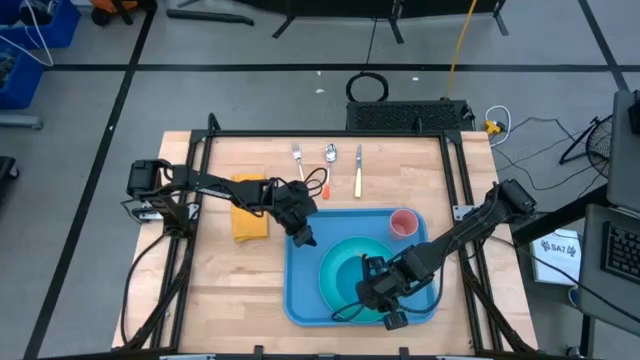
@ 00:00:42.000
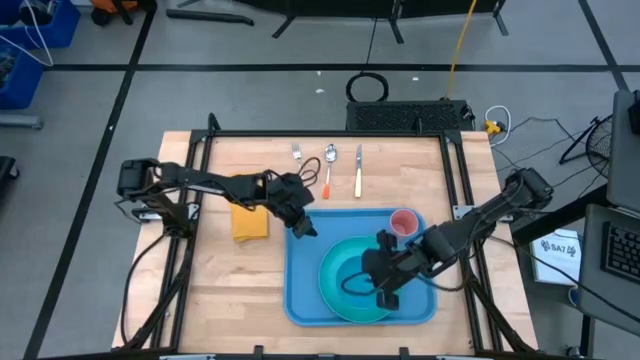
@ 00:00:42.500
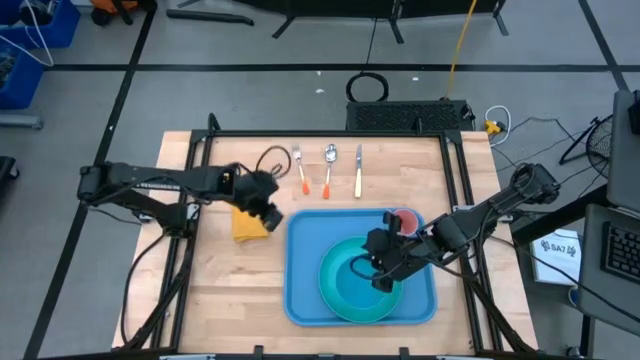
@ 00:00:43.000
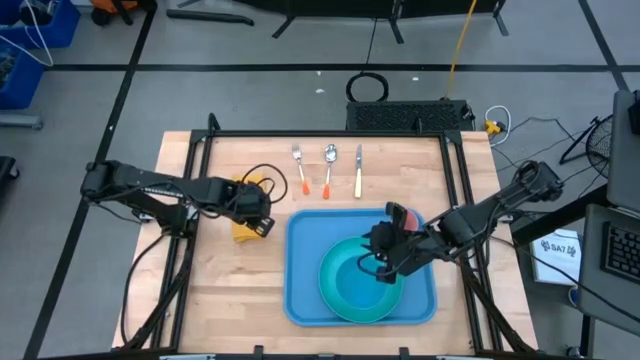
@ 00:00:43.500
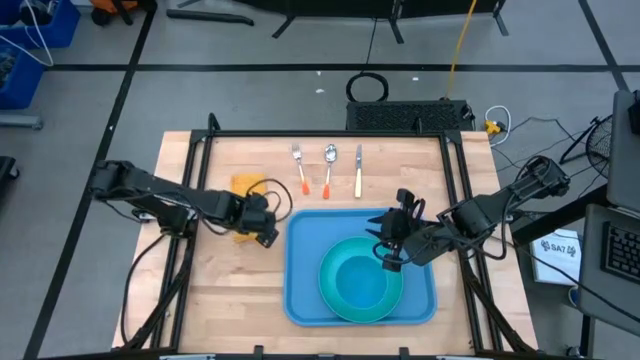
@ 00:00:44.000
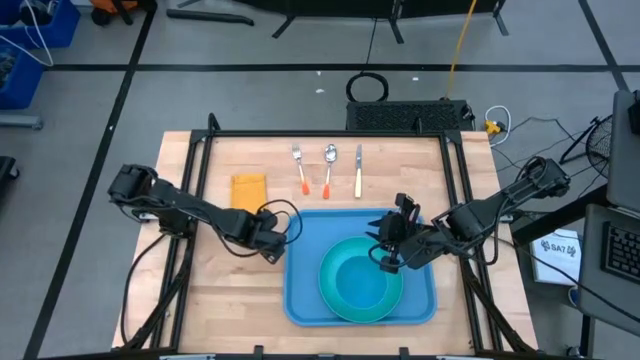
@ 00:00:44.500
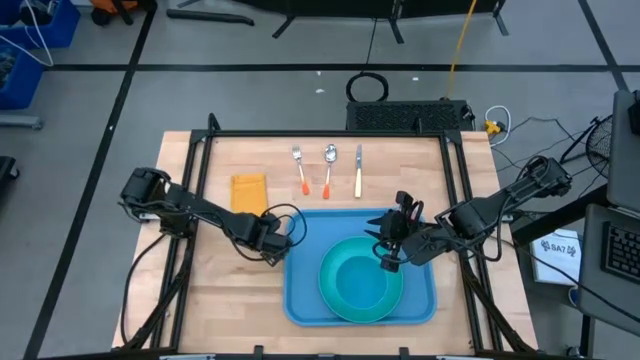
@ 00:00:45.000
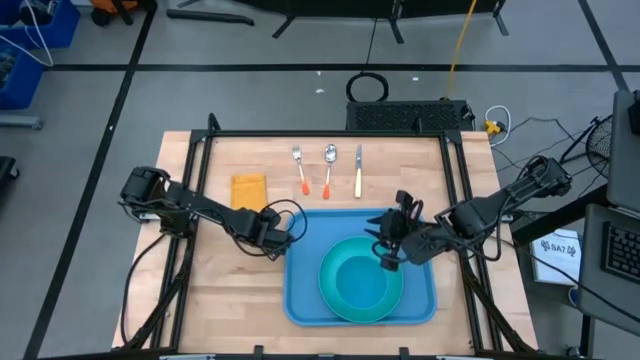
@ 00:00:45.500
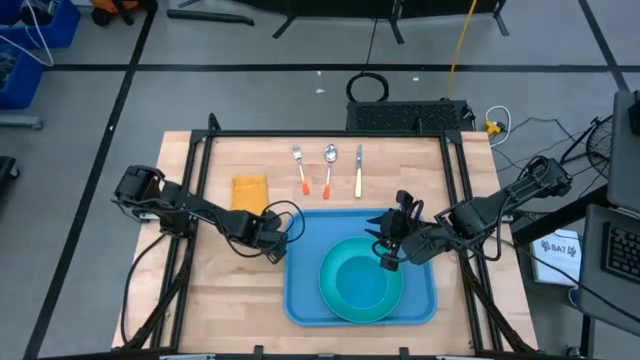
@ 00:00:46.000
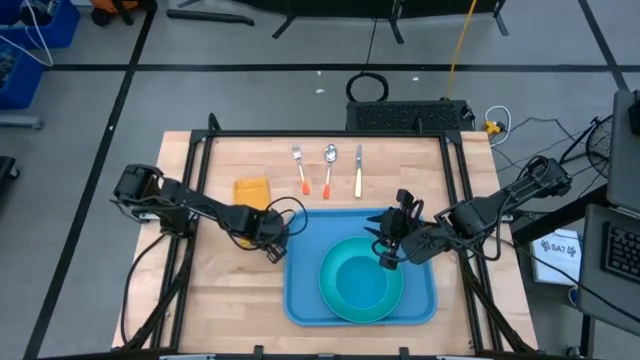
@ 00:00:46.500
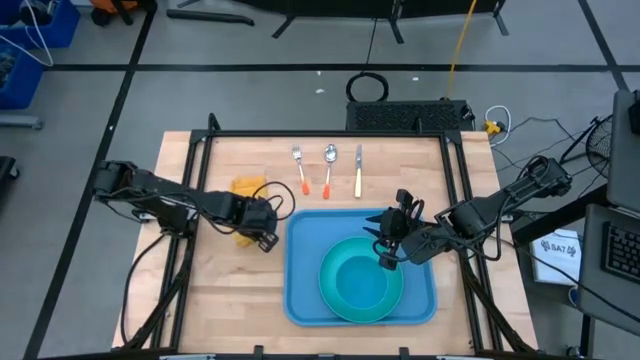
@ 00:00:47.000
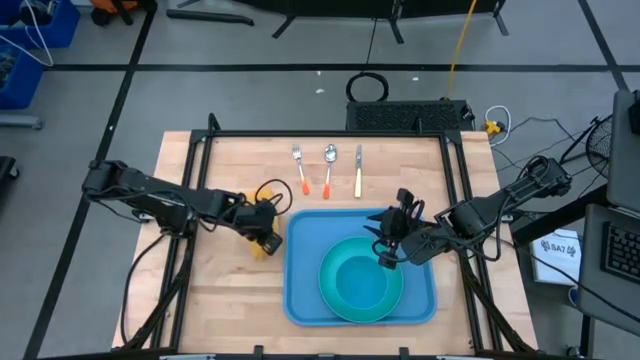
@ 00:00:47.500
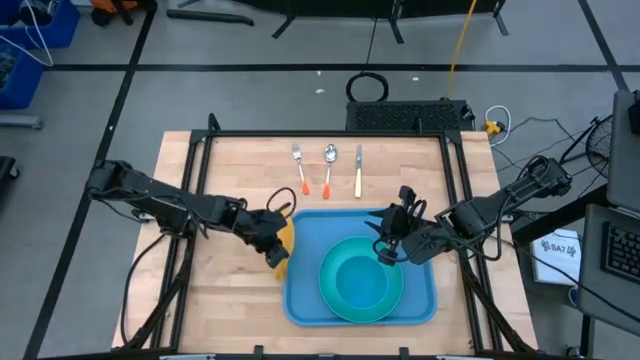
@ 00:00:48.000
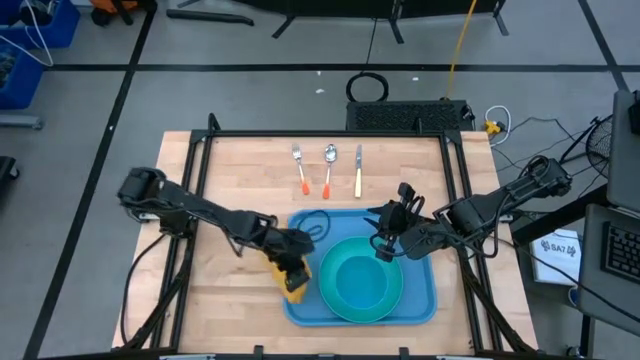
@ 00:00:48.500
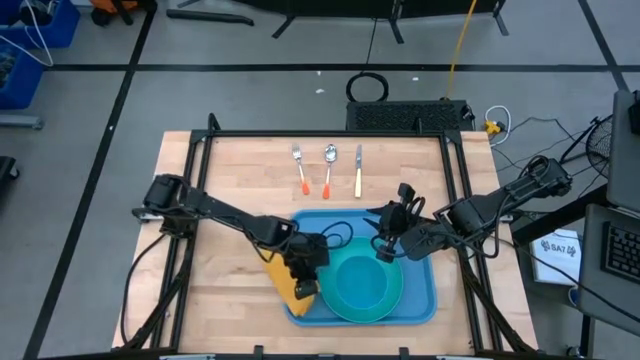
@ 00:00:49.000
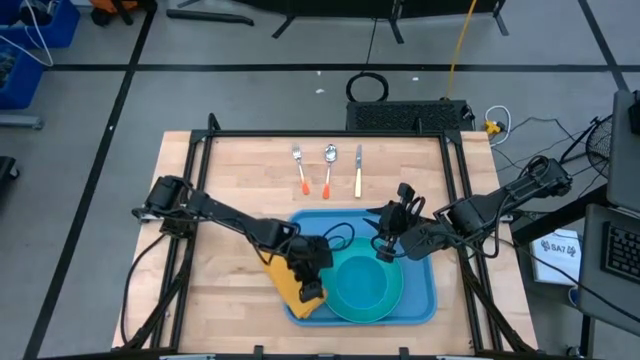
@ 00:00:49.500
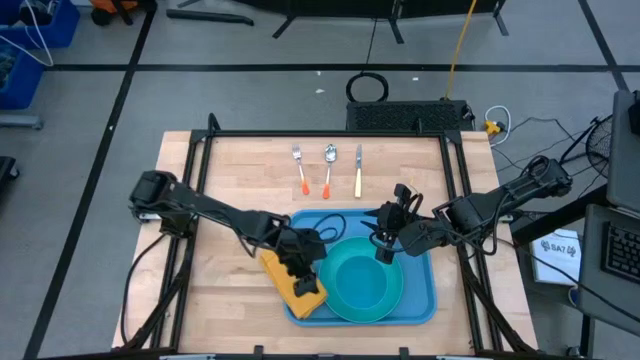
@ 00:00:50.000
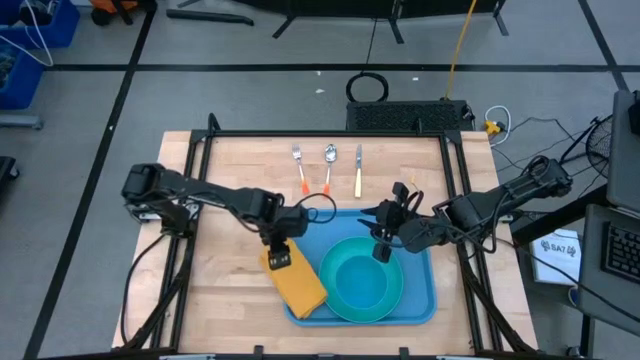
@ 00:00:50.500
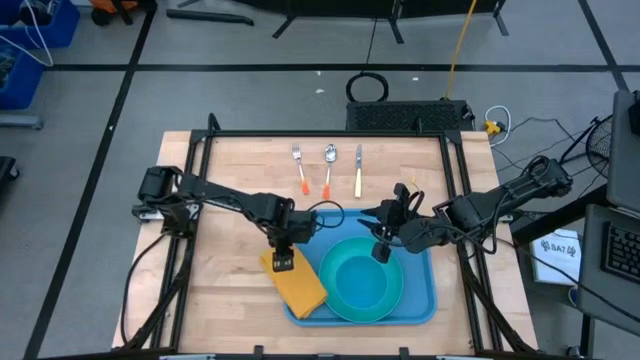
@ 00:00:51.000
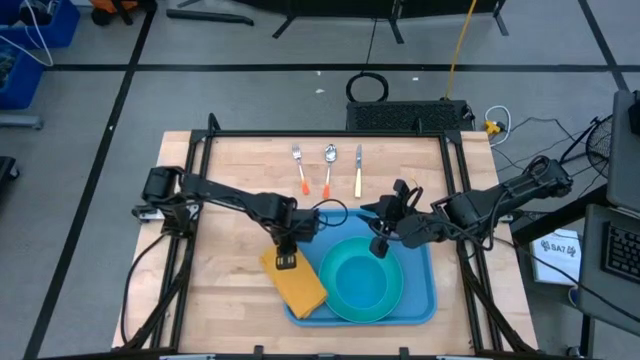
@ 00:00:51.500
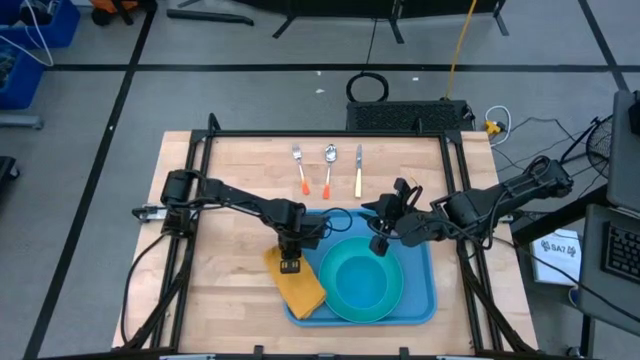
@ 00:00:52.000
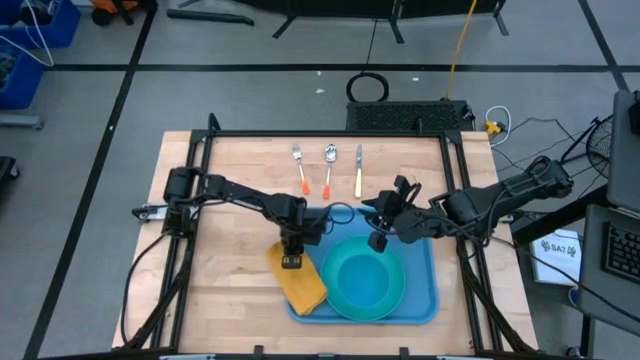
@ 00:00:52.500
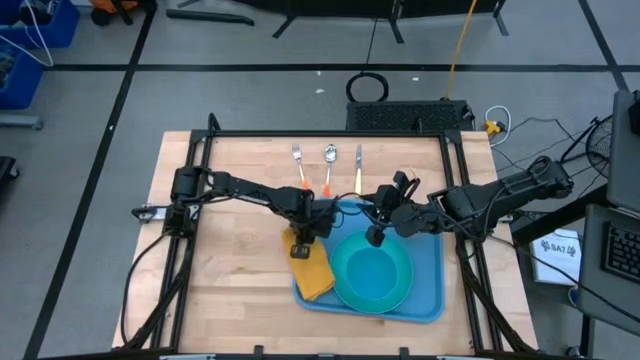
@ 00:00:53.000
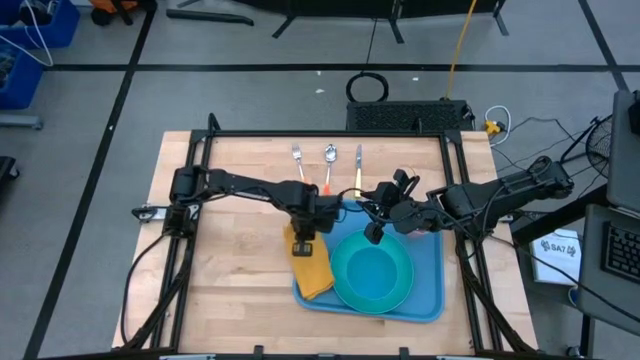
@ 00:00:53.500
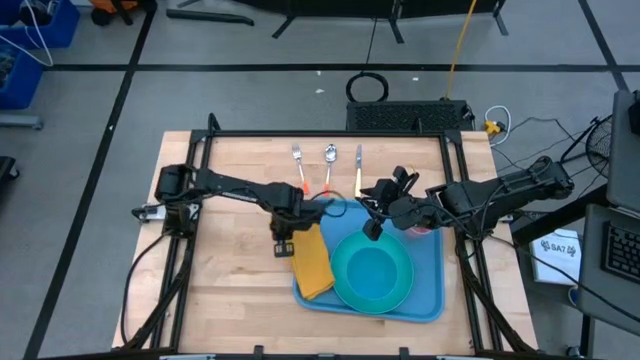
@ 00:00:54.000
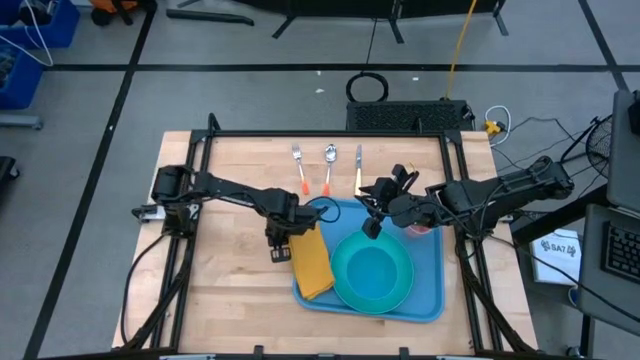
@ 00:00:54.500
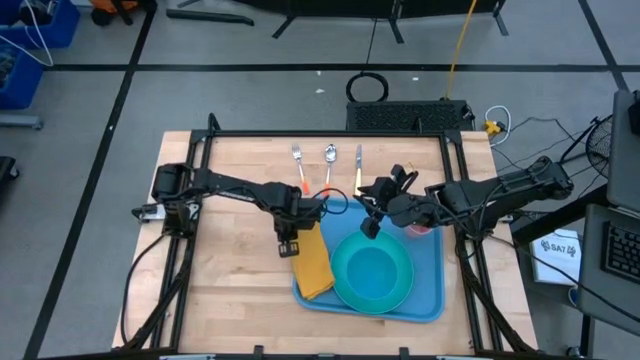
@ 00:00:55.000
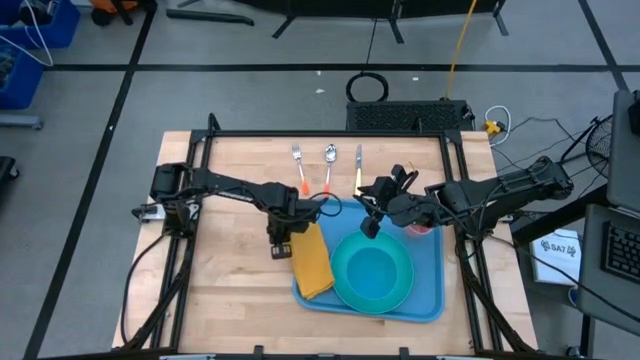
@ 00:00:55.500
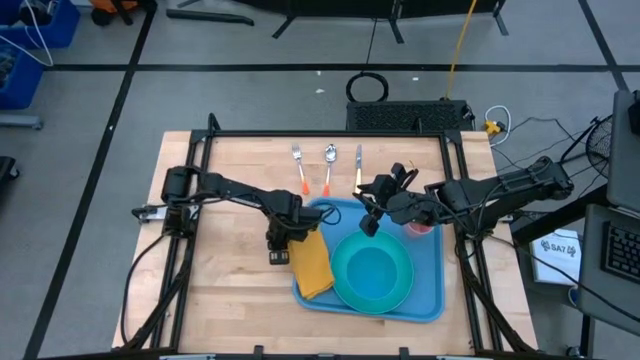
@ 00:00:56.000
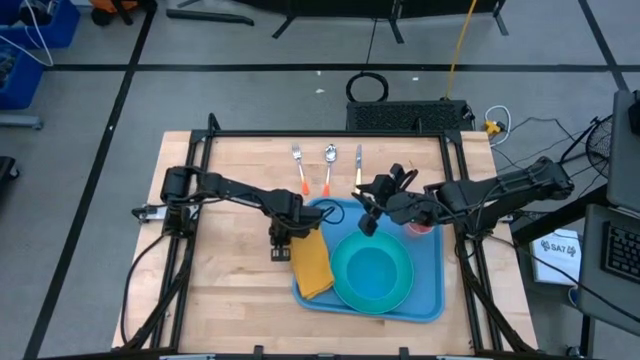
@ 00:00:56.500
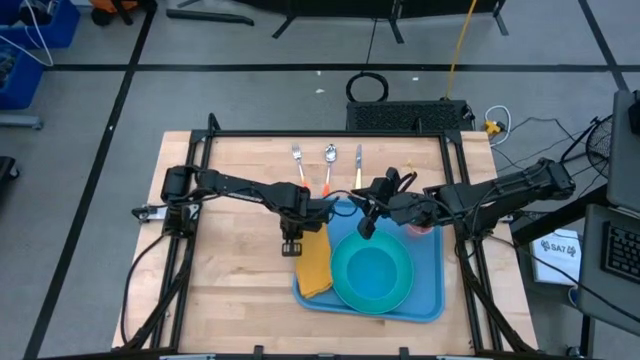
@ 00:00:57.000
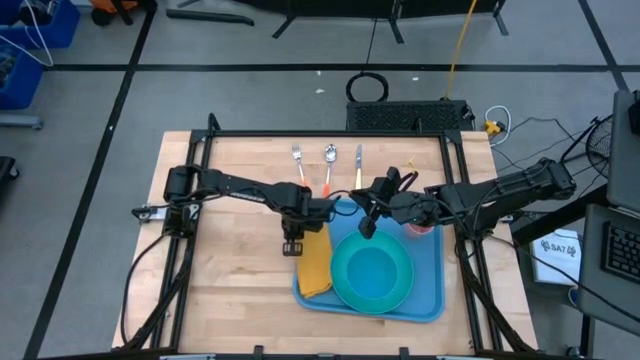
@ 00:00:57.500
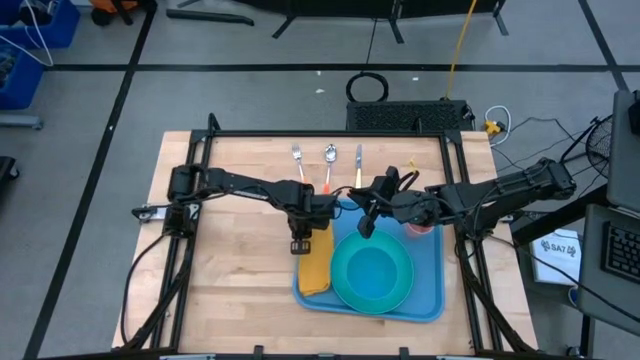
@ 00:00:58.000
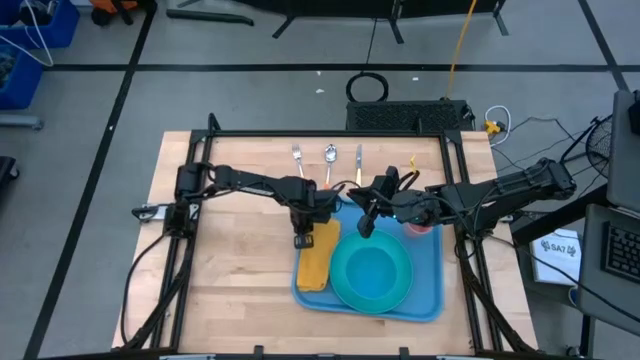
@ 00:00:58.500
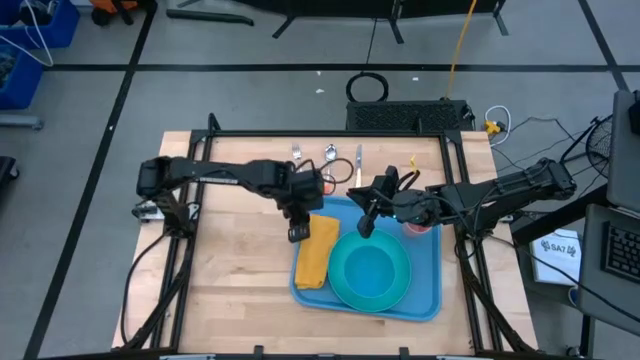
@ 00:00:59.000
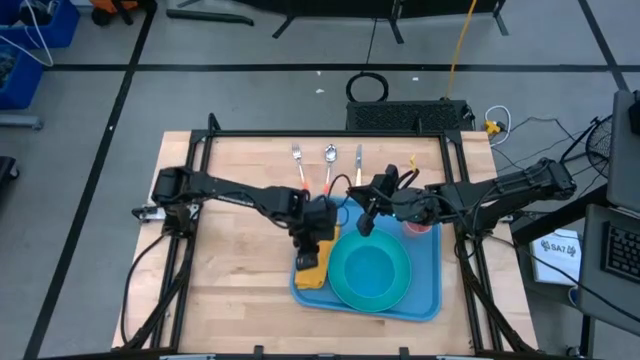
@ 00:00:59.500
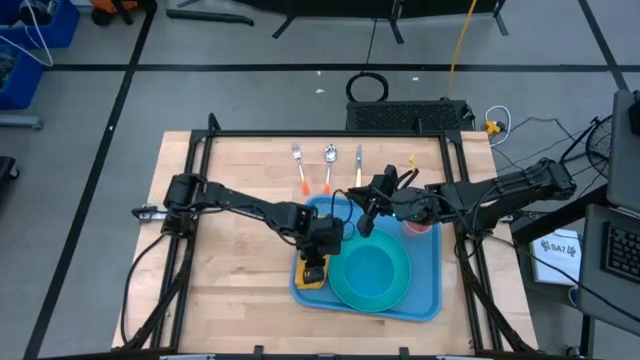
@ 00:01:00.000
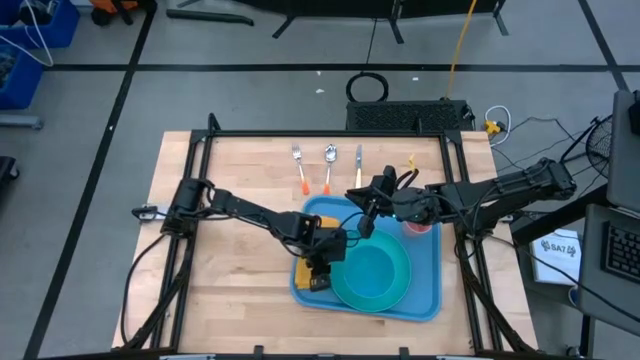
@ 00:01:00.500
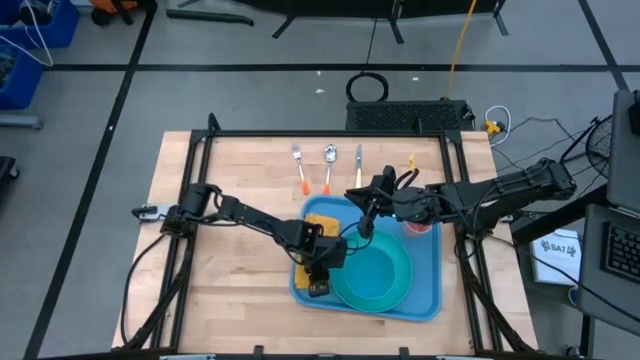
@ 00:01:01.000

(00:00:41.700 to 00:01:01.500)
Task: Set up tray
Put the yellow napkin to the left of green plate on the blue serving tray
